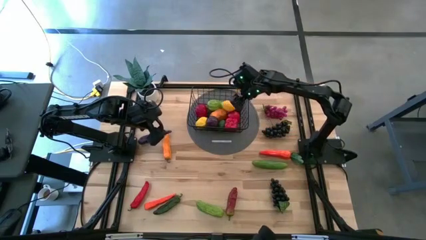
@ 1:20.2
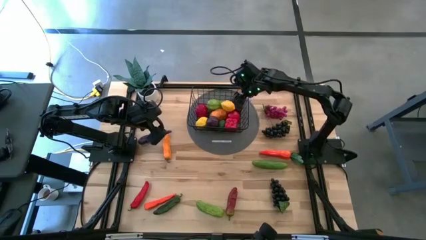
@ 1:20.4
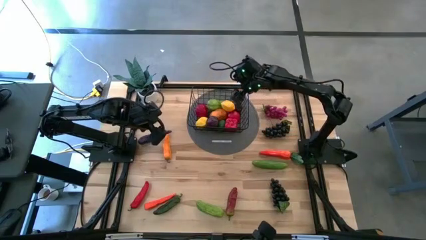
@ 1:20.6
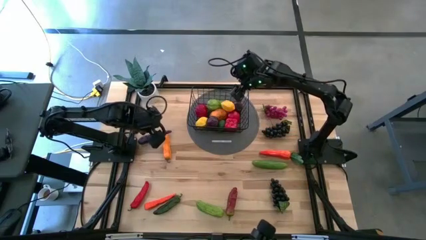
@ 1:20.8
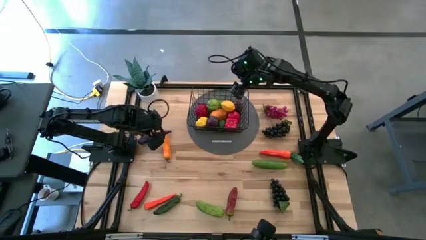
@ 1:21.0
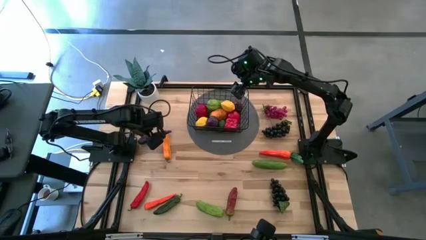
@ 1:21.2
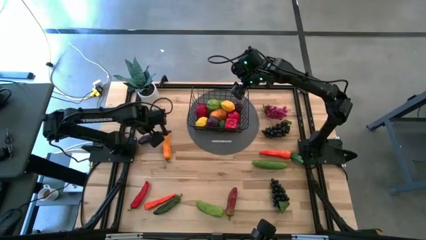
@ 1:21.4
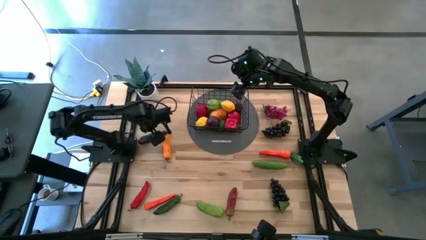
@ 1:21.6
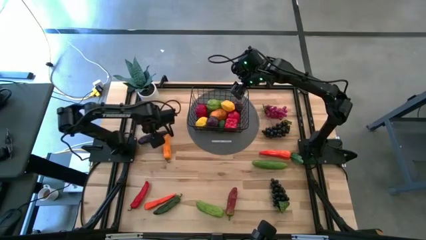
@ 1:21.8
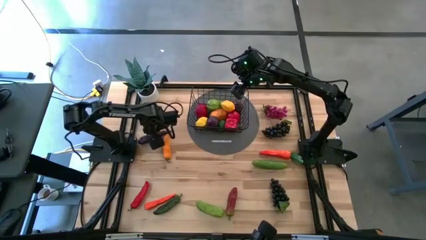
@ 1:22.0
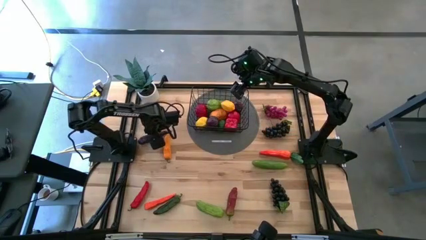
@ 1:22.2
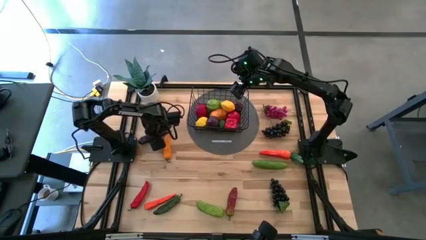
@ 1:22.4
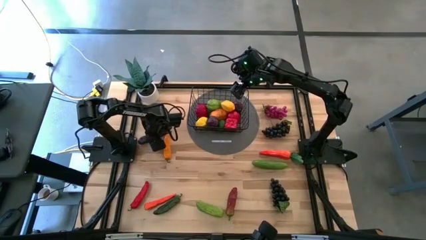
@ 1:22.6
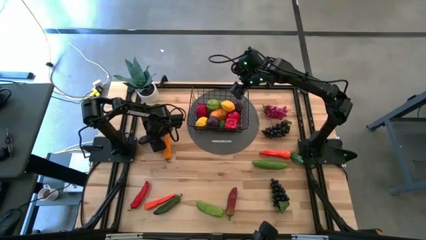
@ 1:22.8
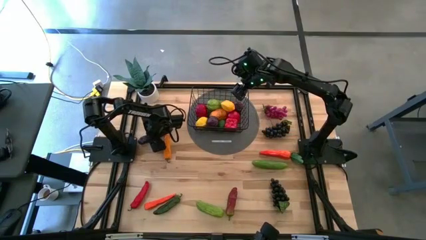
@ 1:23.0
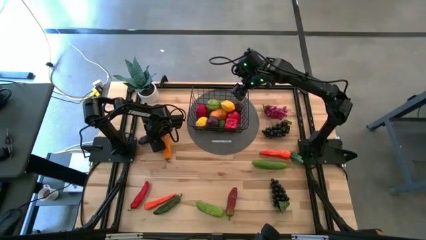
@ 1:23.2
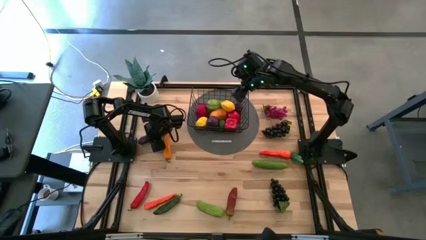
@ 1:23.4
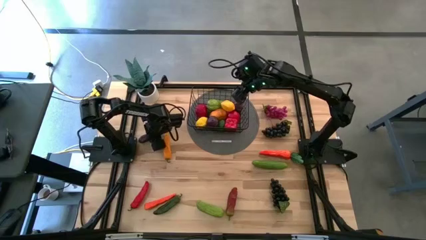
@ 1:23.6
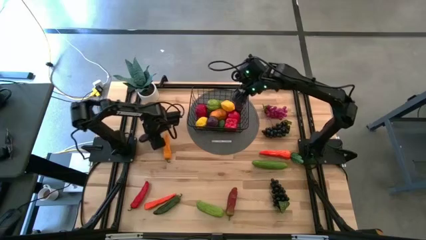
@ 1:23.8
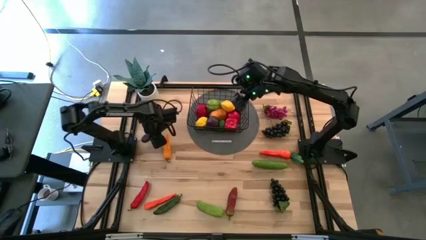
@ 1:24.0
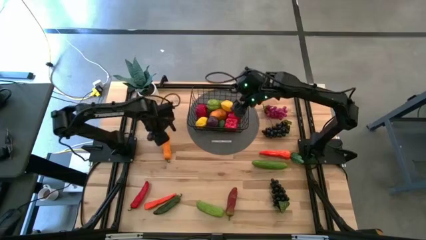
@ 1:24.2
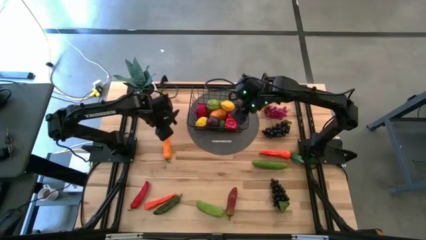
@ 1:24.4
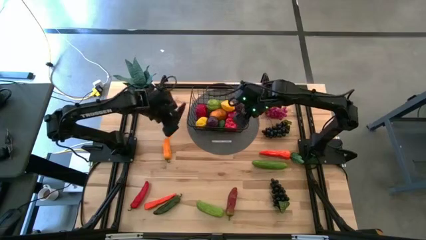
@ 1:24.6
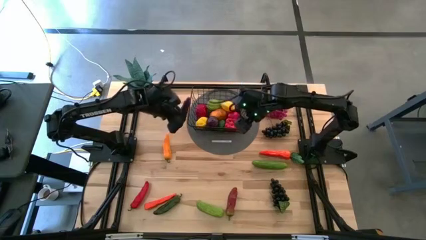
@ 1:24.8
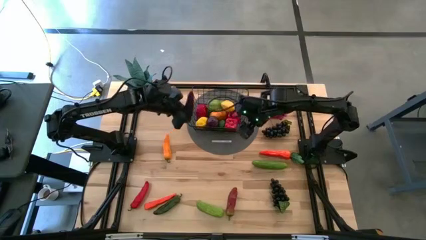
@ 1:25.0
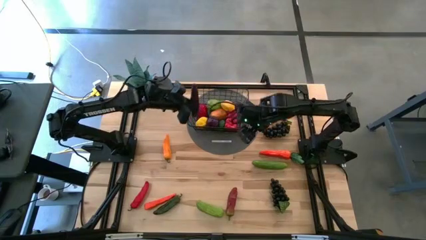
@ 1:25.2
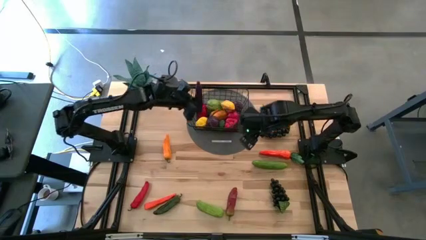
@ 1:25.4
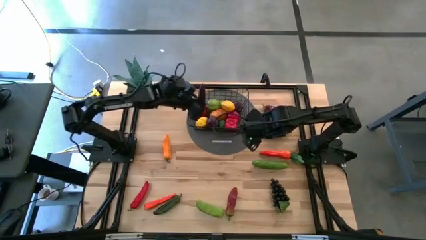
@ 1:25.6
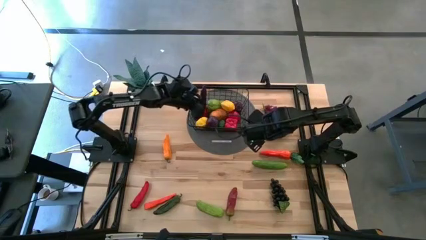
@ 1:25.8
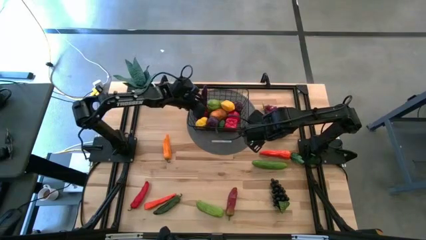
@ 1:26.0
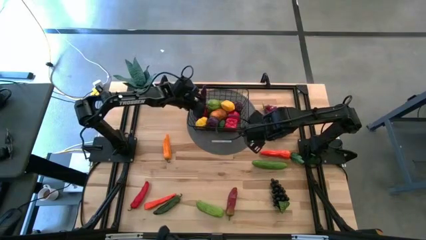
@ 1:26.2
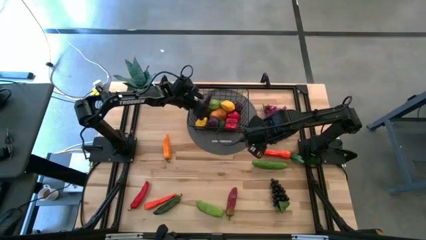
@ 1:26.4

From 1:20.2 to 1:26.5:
Task: Build produce basket
Put the eggplant into the wire basket

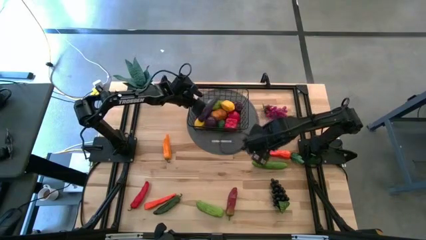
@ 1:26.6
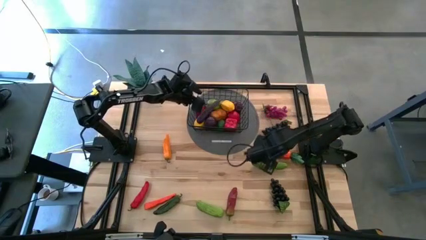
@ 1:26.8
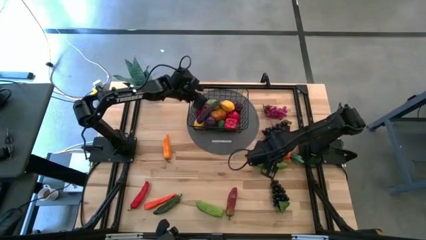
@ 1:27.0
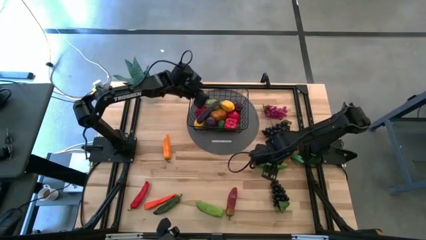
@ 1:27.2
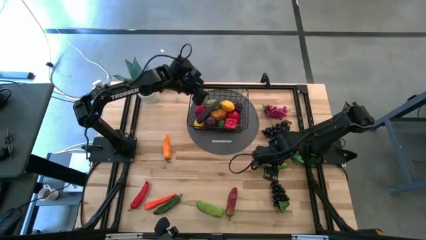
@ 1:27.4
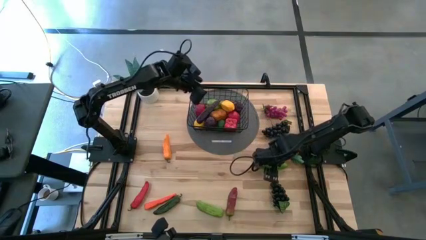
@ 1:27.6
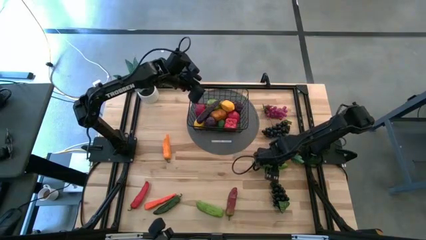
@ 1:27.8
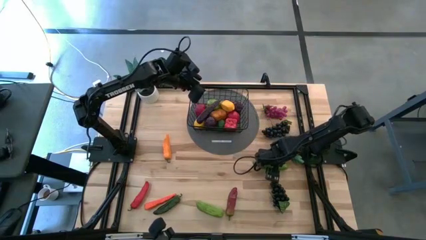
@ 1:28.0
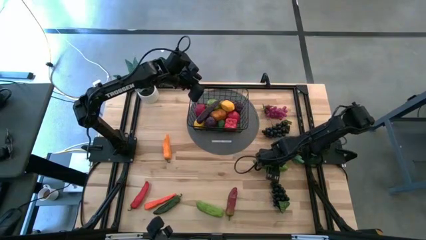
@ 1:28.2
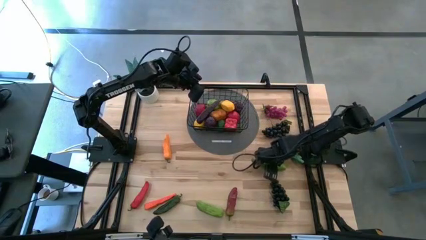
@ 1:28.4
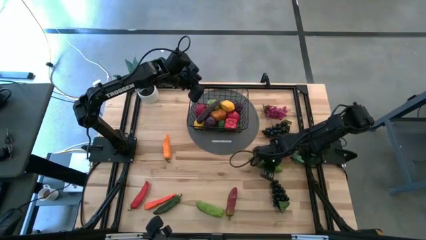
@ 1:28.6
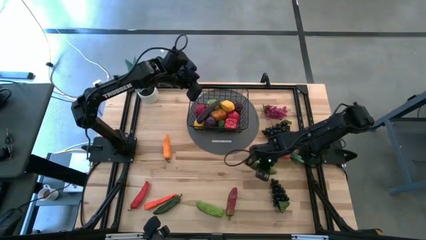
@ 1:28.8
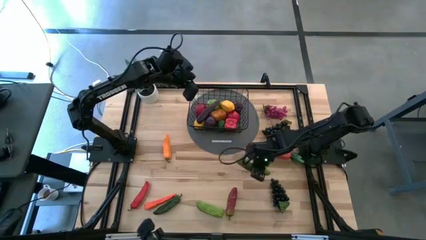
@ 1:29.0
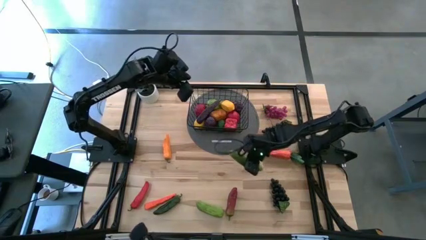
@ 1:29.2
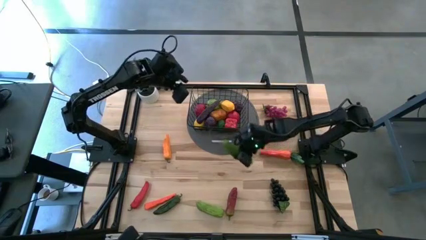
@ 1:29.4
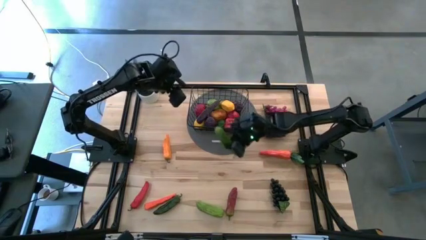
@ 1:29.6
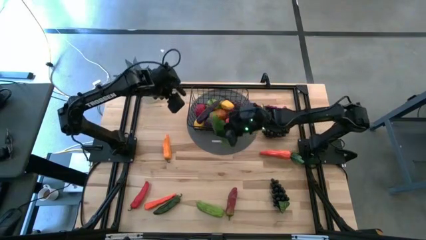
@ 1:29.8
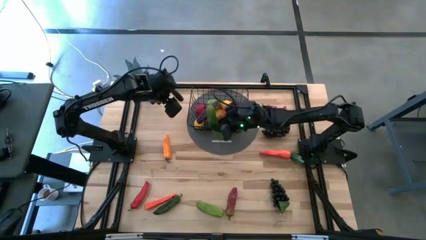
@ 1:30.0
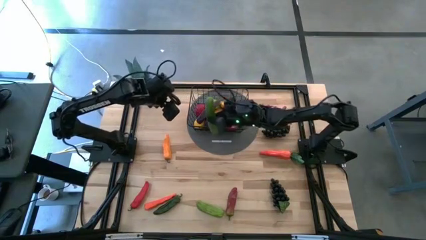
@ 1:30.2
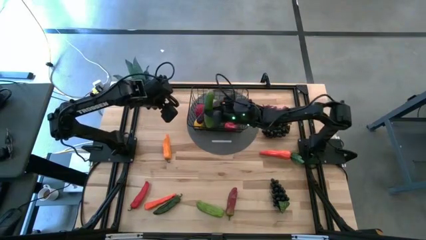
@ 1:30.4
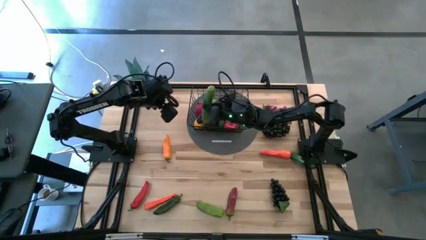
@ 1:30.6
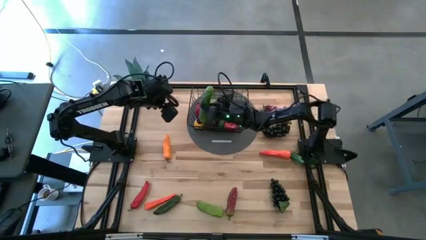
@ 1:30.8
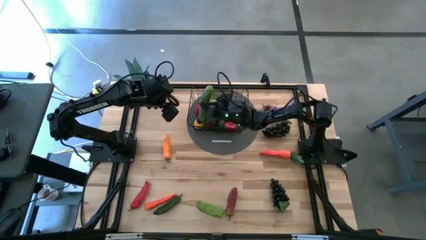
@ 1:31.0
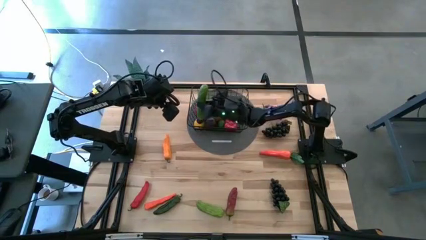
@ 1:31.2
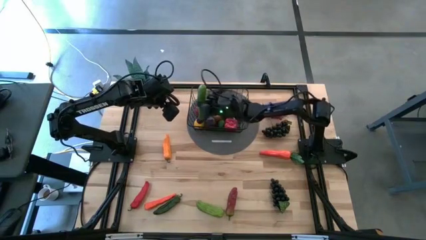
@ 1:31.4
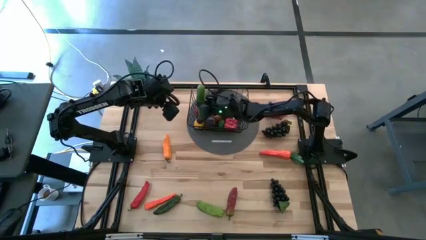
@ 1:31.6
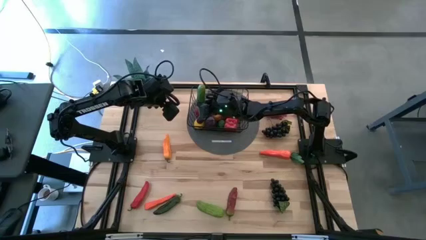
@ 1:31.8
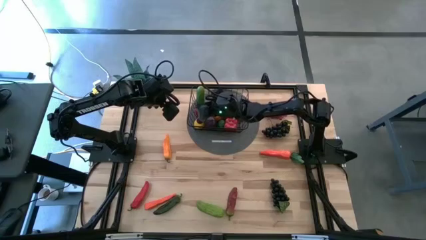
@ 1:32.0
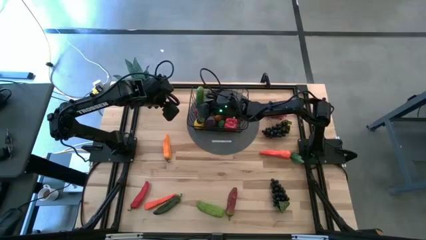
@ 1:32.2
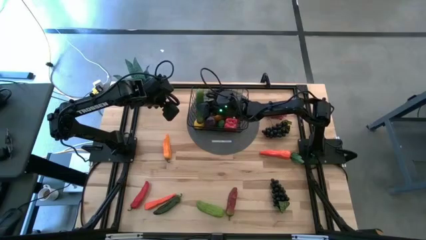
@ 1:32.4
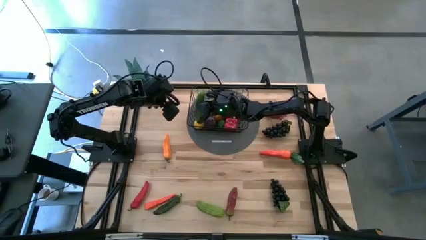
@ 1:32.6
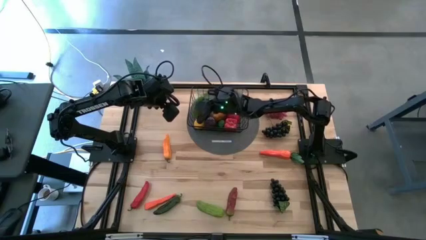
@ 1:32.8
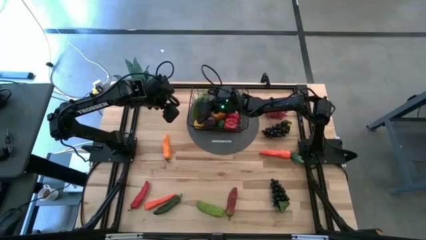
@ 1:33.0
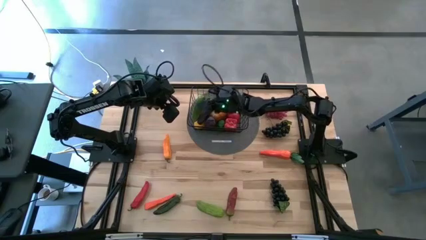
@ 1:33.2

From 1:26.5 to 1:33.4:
Put the top cucumber into the wire basket

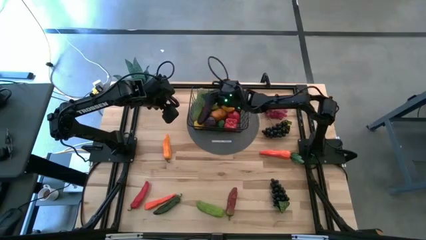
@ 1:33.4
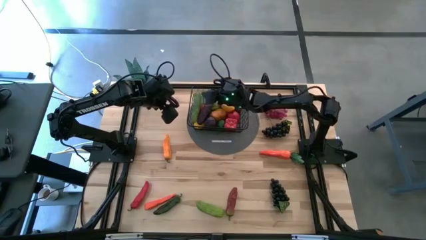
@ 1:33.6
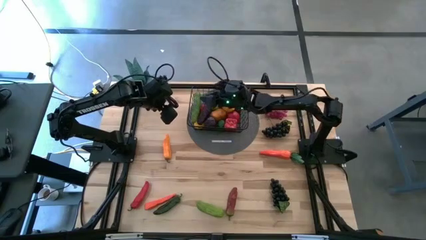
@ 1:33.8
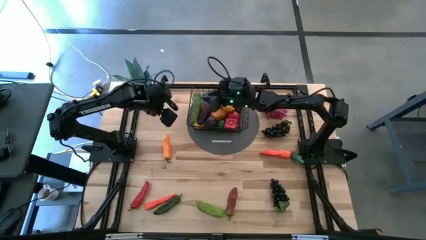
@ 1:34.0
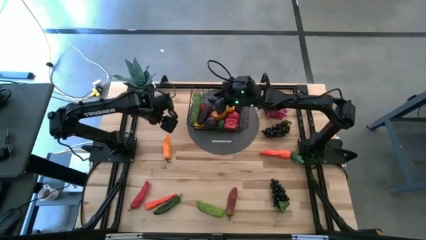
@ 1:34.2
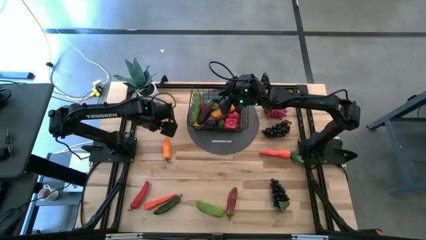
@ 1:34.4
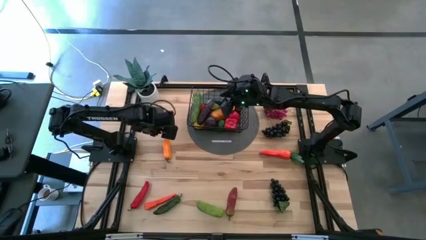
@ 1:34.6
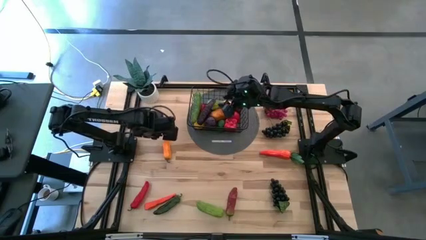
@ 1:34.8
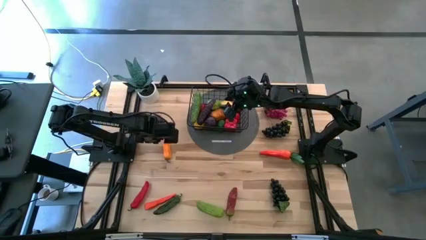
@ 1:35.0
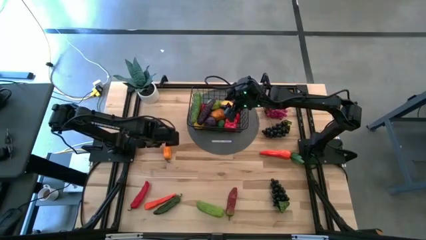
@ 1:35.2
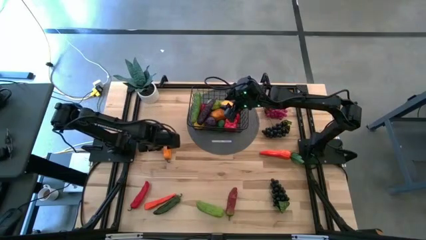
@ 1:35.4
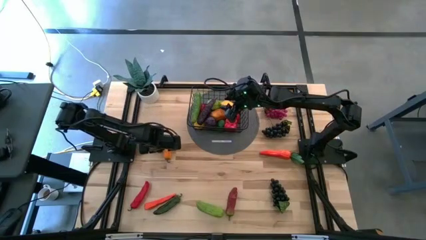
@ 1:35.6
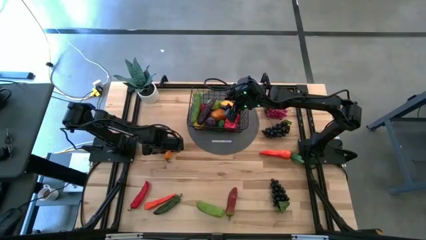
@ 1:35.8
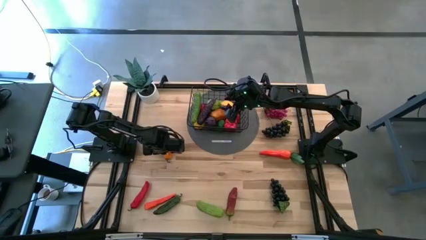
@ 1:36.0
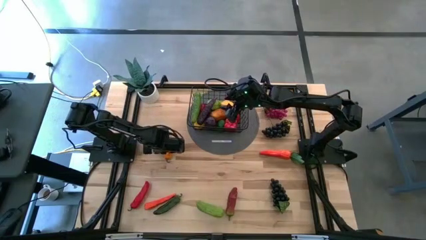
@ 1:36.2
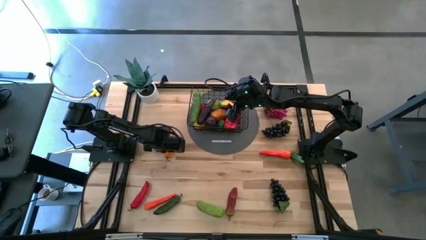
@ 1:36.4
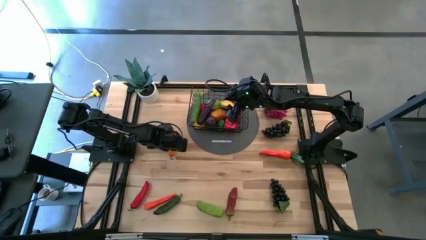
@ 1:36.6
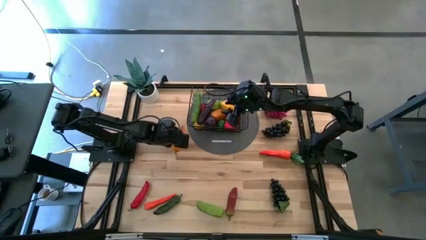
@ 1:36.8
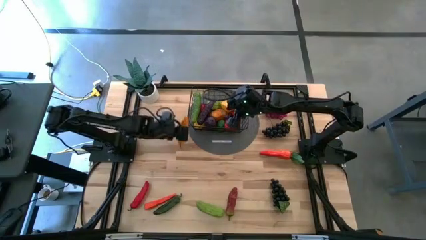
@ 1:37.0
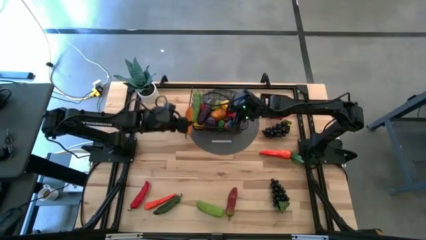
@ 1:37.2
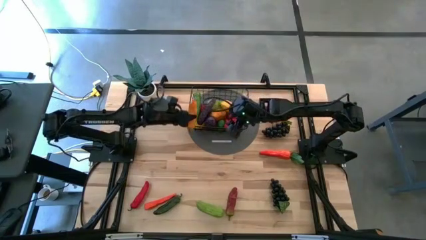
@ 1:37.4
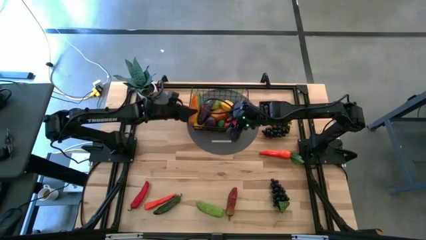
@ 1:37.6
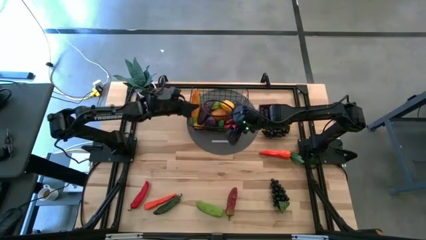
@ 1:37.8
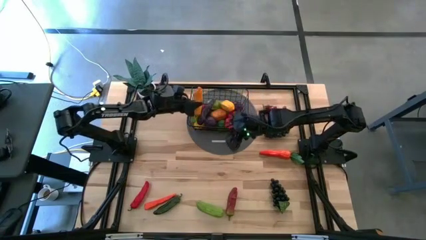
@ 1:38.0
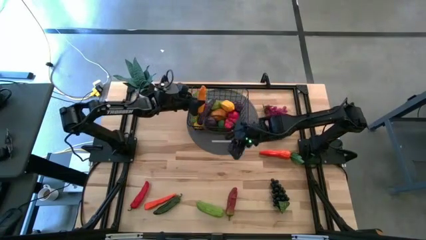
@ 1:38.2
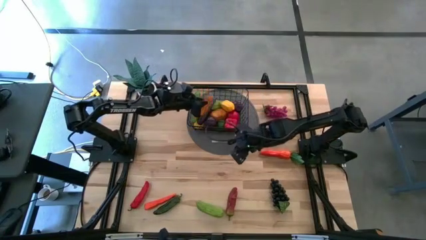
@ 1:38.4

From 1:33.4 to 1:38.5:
Put the yellow chili pepper into the wire basket
